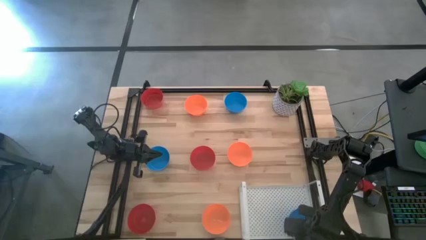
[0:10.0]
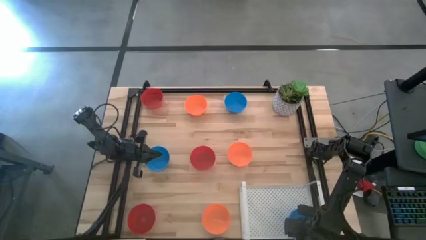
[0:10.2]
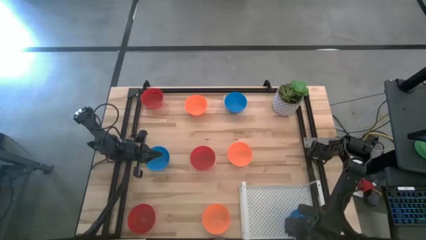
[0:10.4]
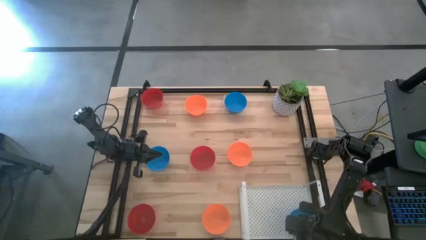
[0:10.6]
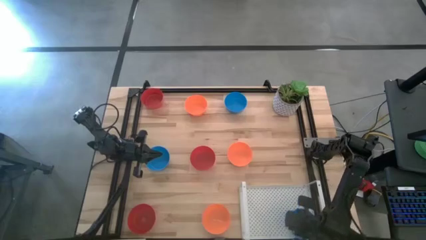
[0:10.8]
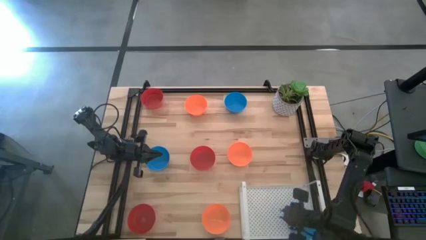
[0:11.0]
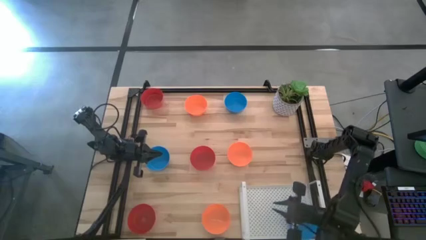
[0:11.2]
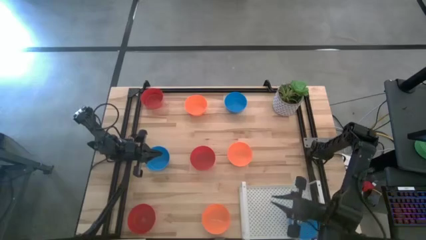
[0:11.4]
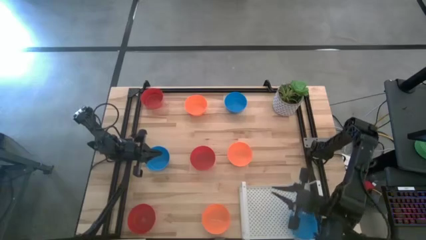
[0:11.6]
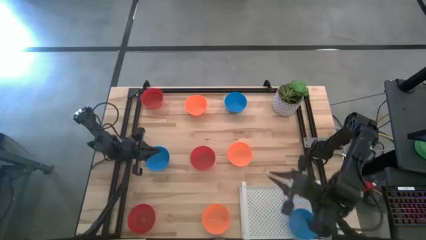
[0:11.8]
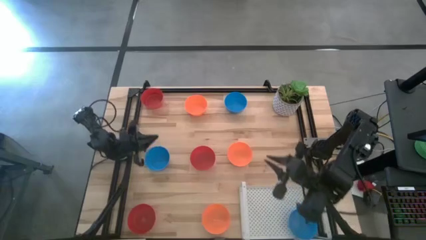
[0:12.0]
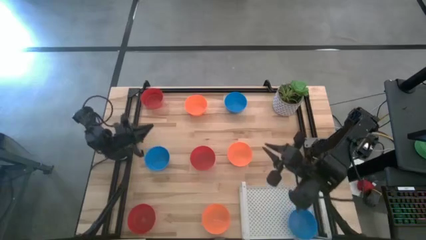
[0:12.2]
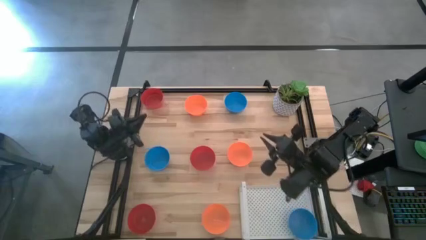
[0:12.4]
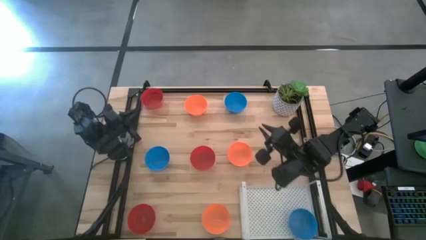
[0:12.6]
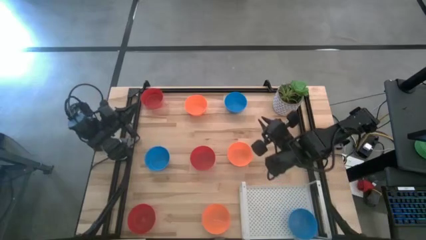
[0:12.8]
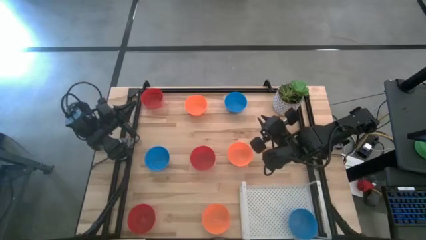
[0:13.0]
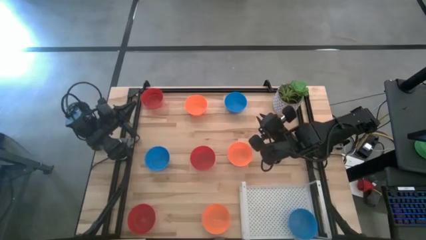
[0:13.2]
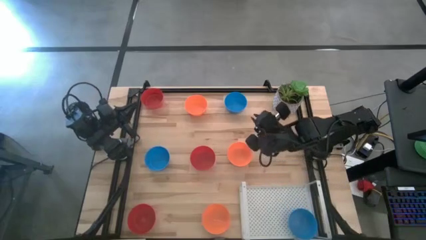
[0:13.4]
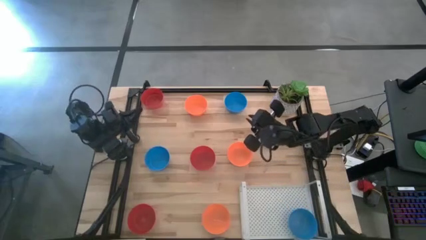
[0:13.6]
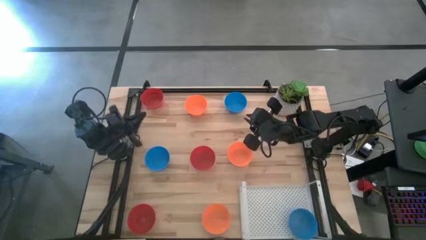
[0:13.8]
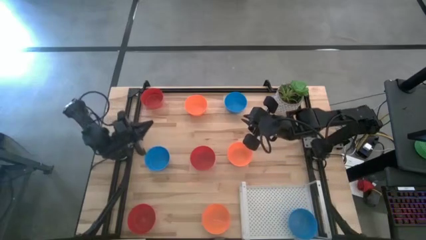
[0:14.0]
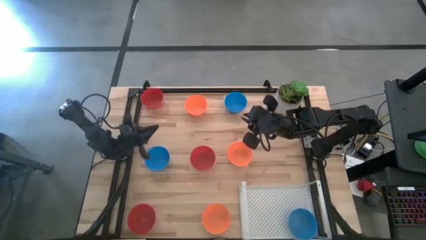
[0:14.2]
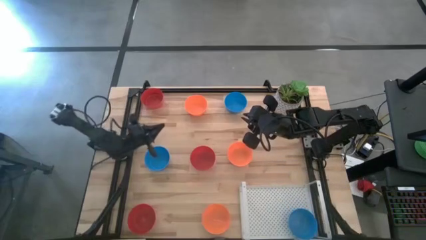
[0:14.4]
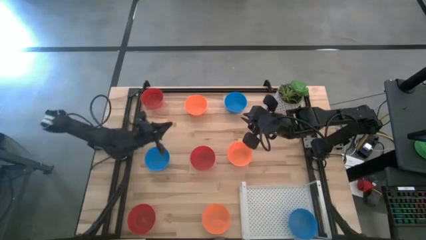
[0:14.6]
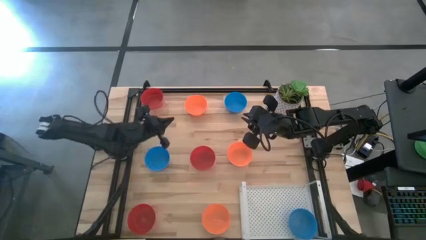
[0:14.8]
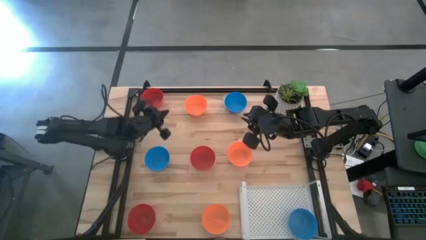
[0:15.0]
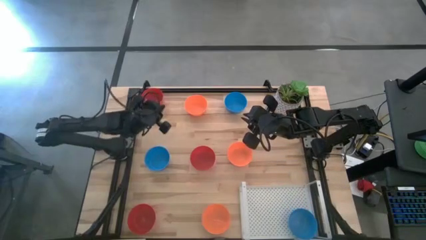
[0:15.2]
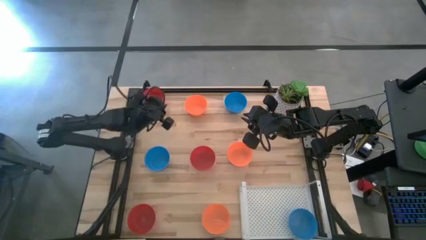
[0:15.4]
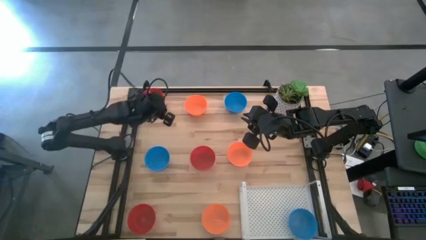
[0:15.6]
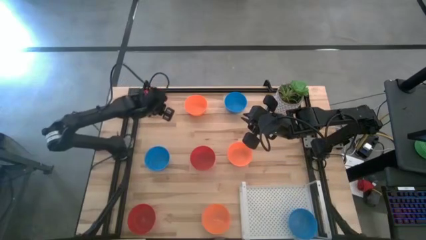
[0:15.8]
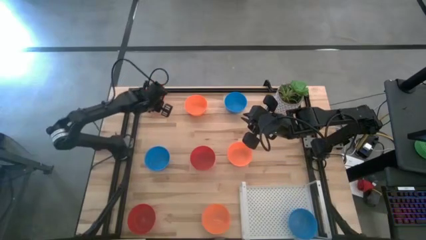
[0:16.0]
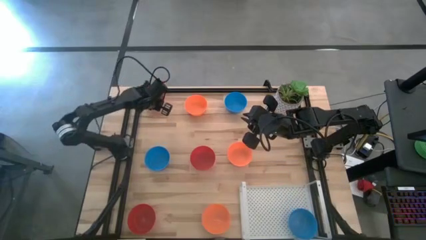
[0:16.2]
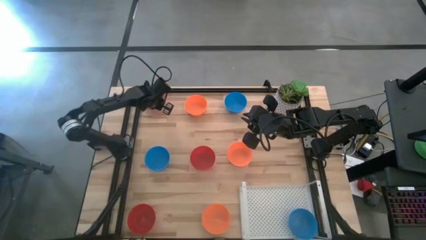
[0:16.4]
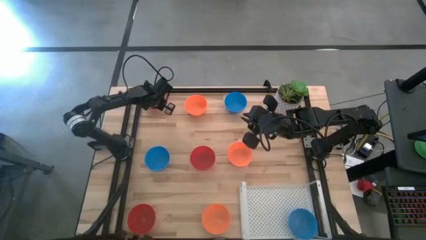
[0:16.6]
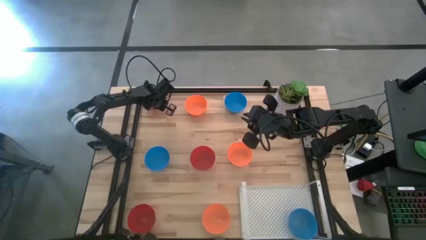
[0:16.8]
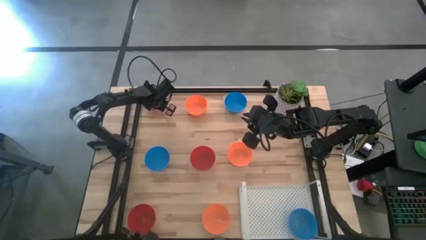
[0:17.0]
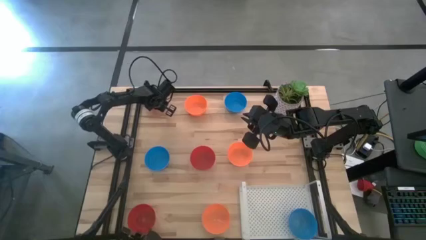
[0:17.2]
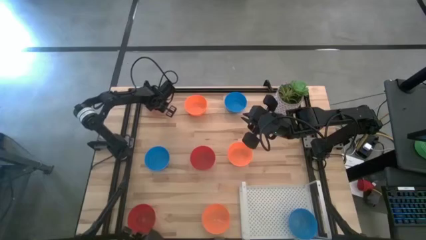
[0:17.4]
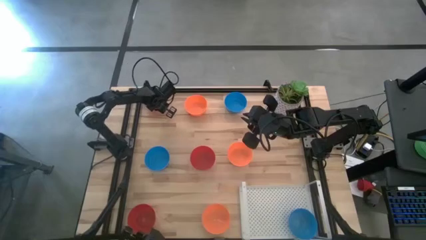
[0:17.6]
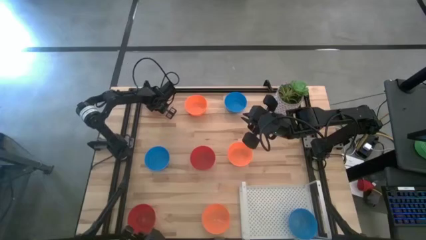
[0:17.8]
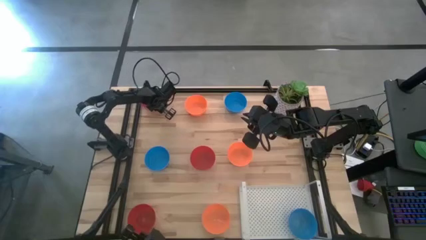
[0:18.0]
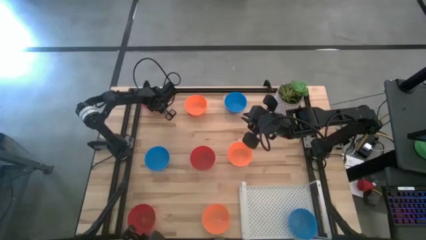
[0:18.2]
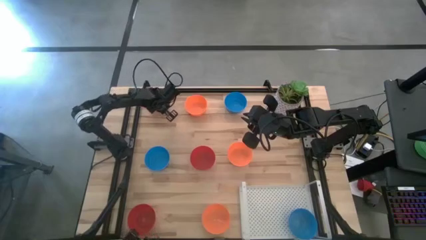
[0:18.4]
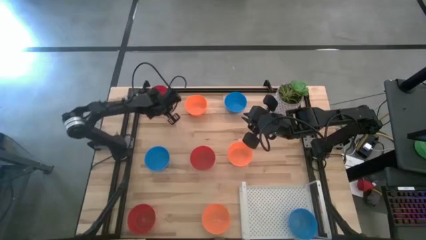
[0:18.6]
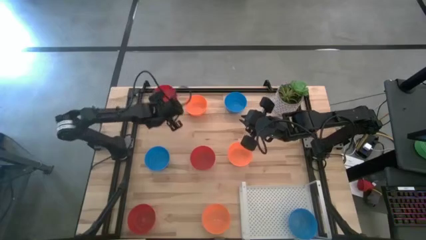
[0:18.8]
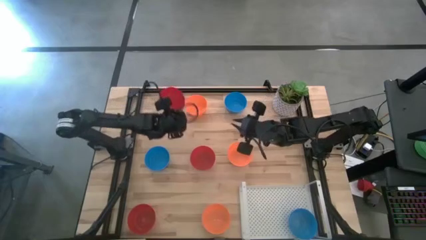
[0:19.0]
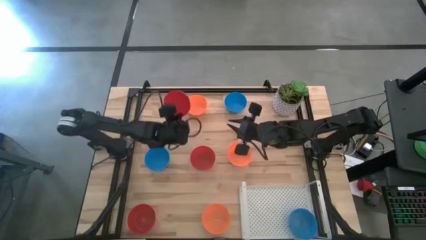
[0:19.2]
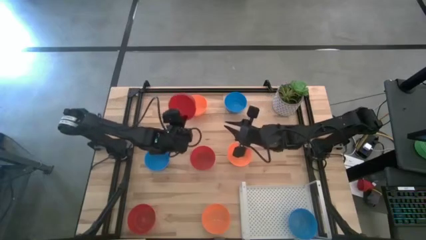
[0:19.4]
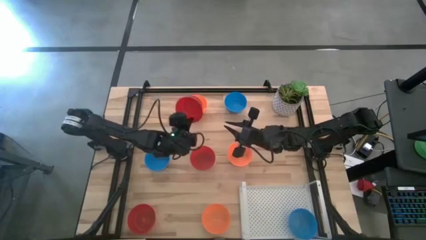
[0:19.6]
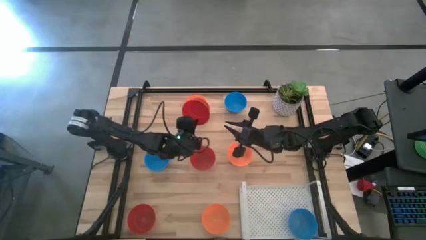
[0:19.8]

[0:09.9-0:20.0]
Task: Pick & Place Mini bowls
Put the top right red bowl on the shelf
